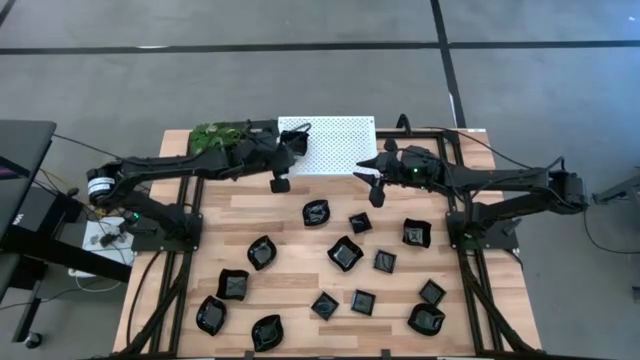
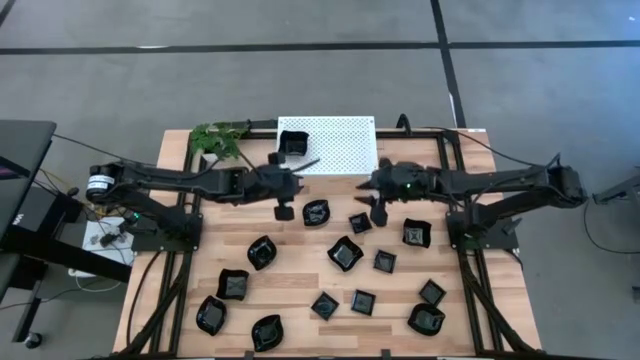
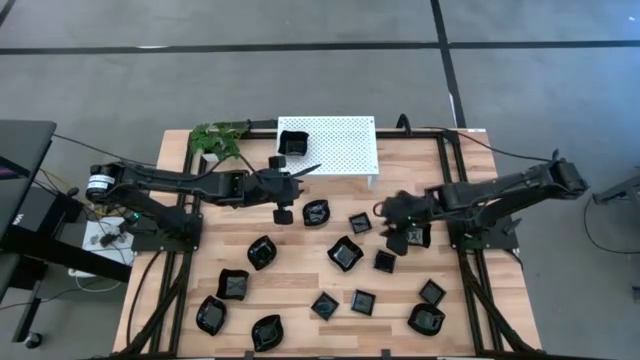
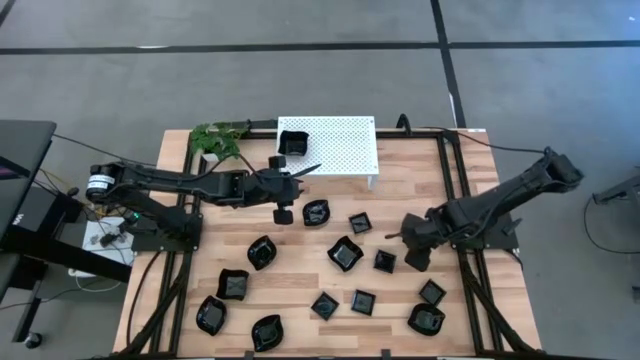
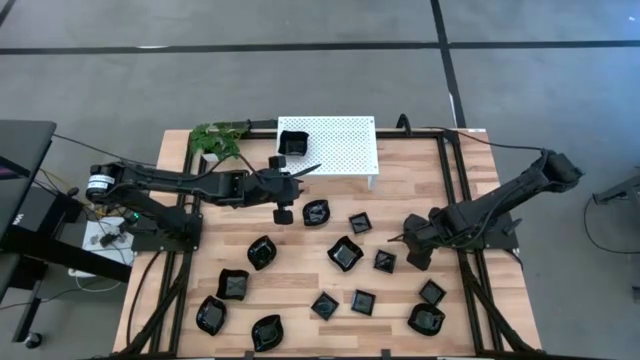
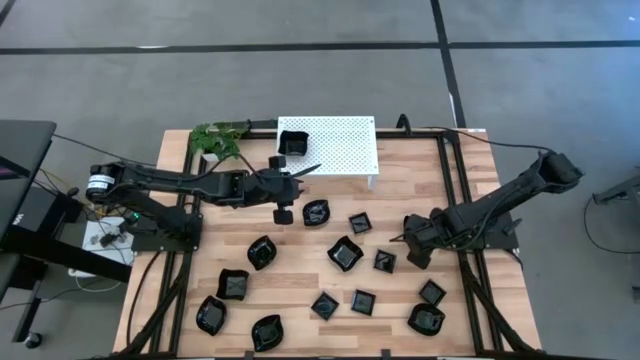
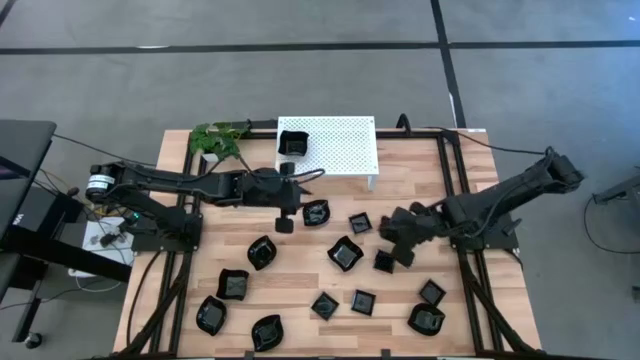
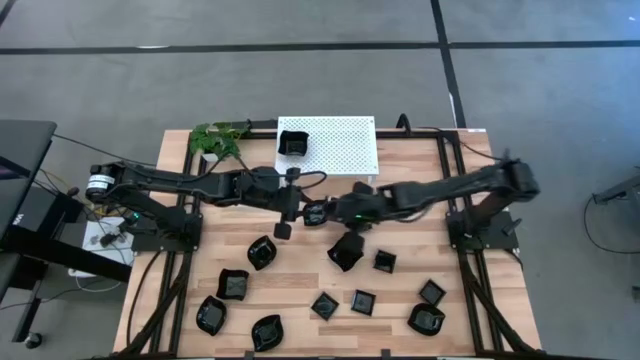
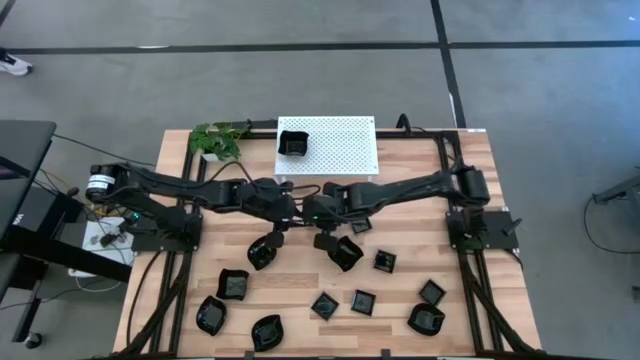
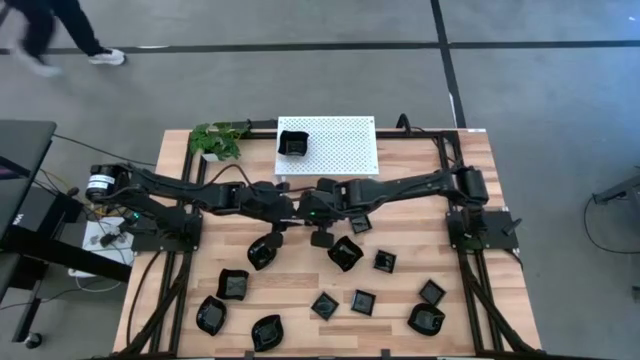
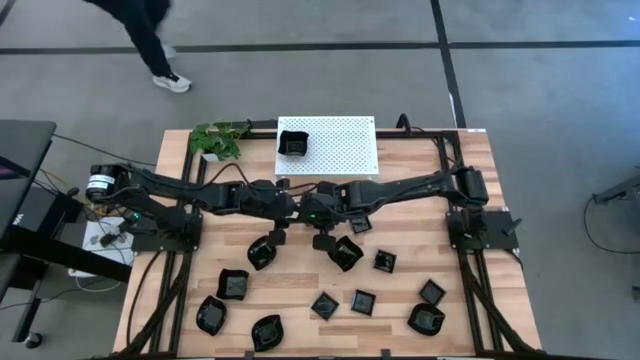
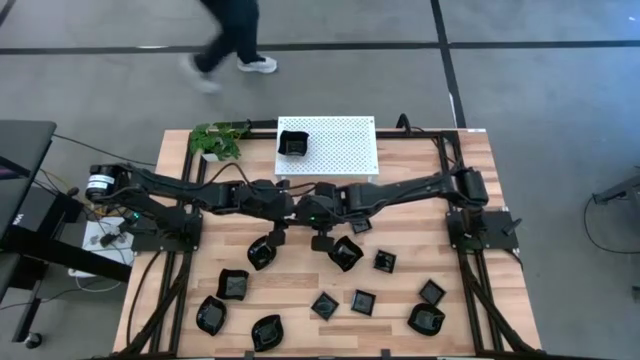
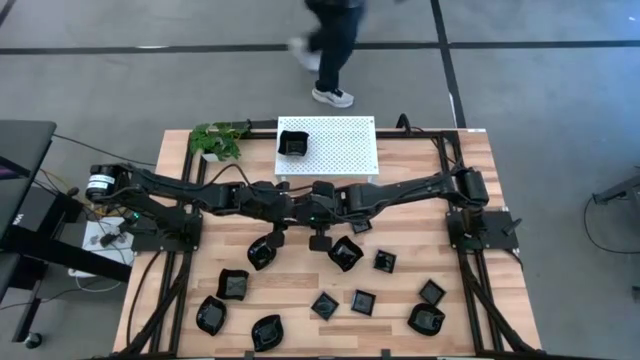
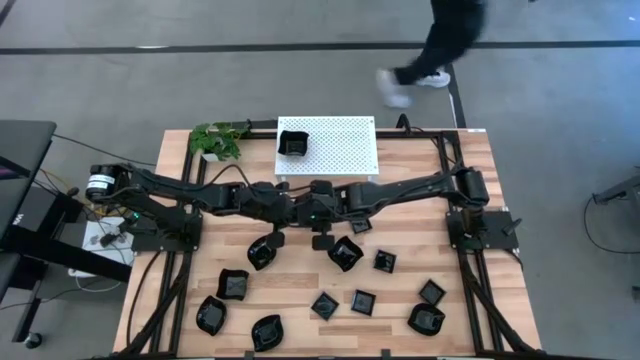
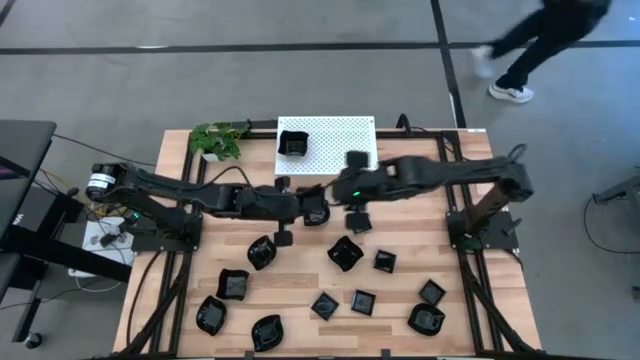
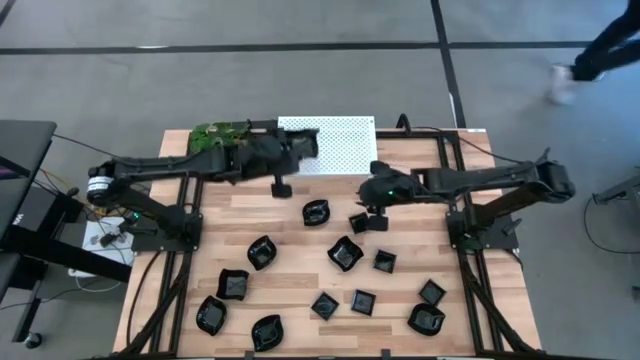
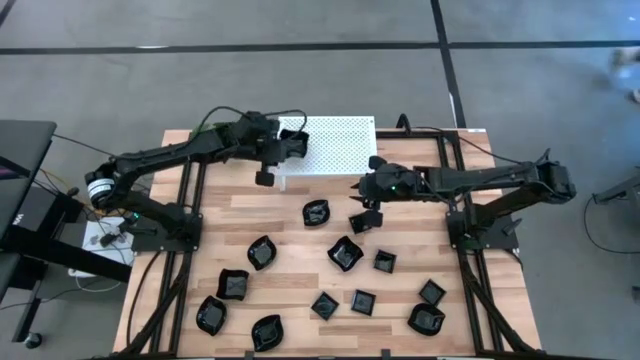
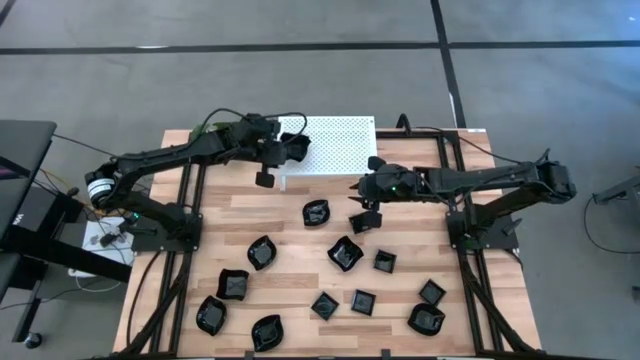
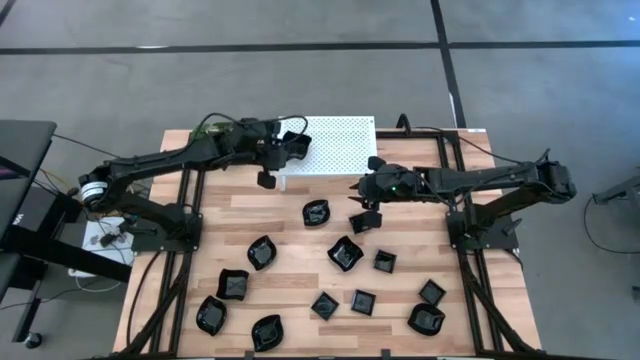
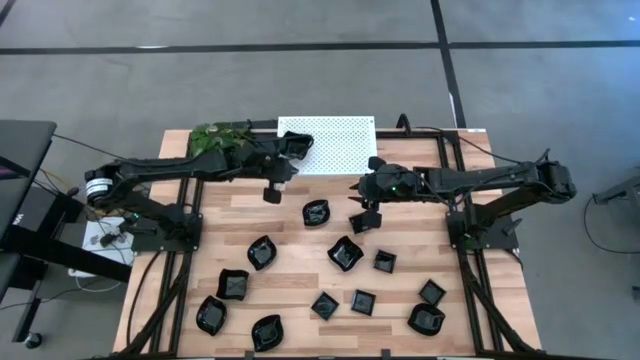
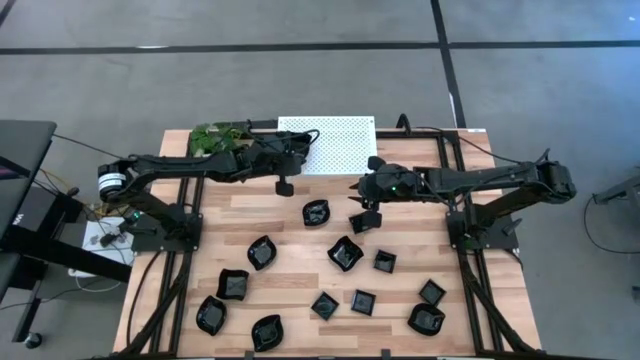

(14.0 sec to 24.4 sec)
Task: Pick & Place Mini shaped plates
Stack the black distorted square plate on top of the black distorted square plates on the shelf

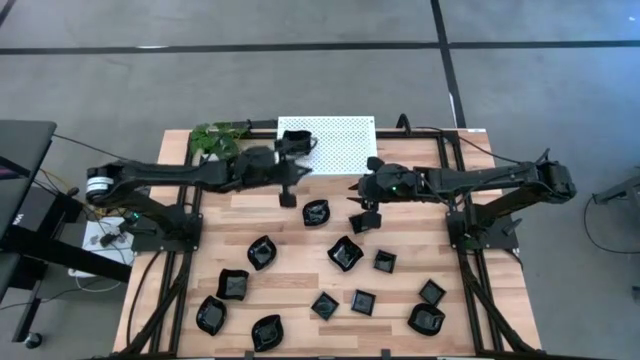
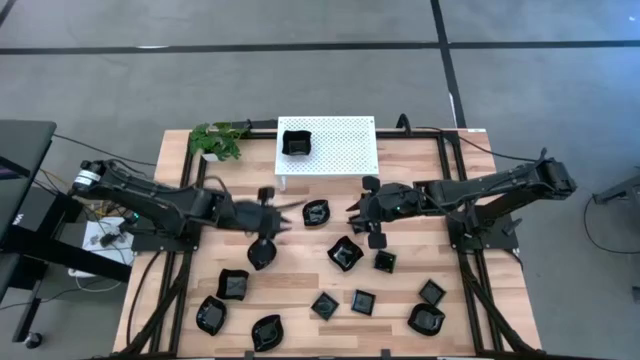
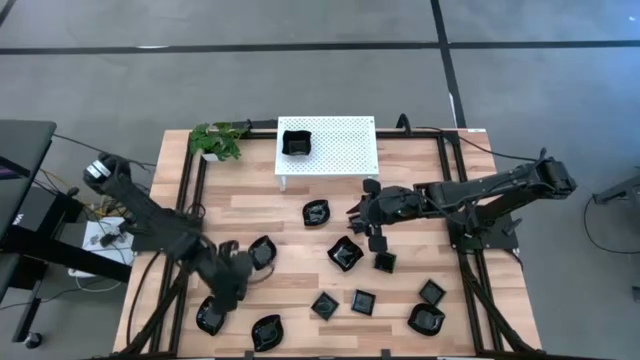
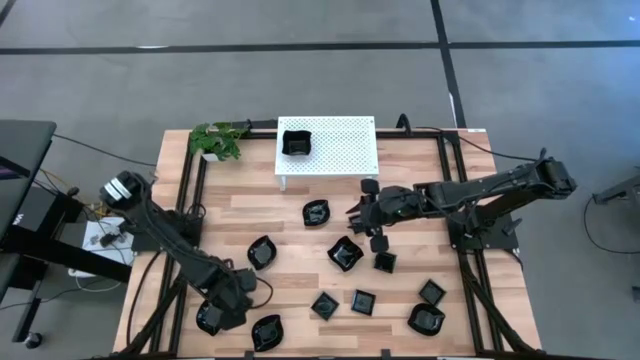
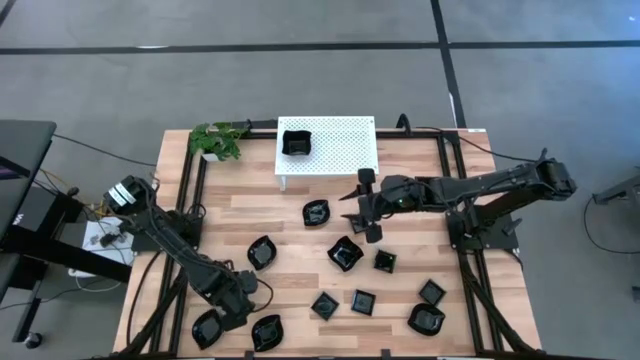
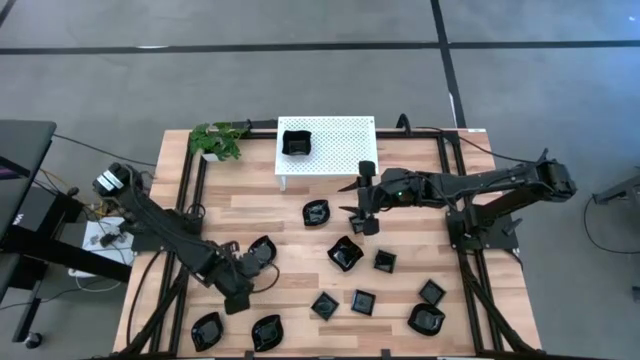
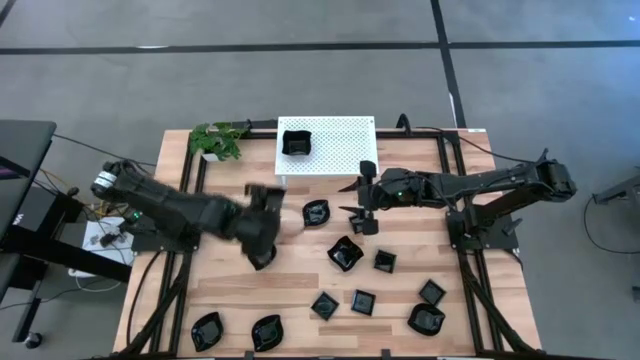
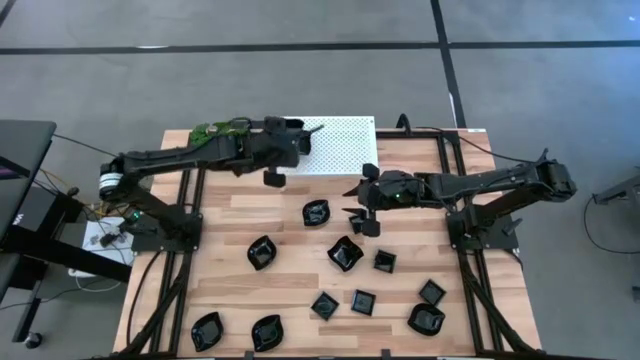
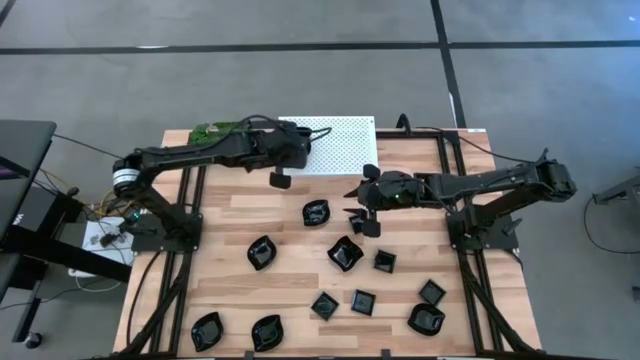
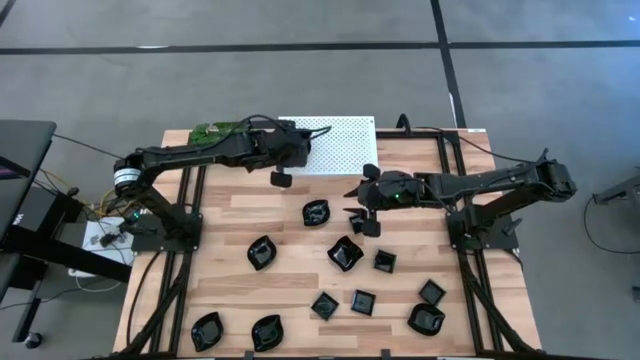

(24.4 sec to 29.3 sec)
Stack the black distorted square plate on top of the black distorted square plates on the shelf

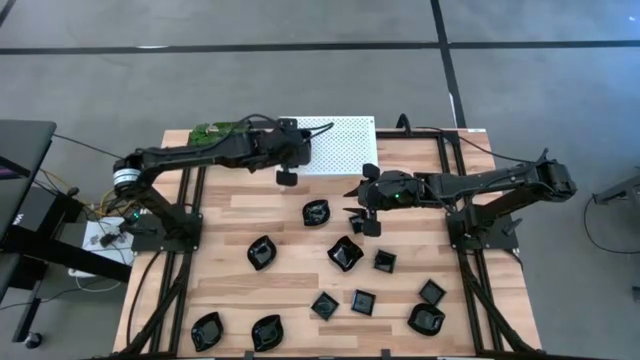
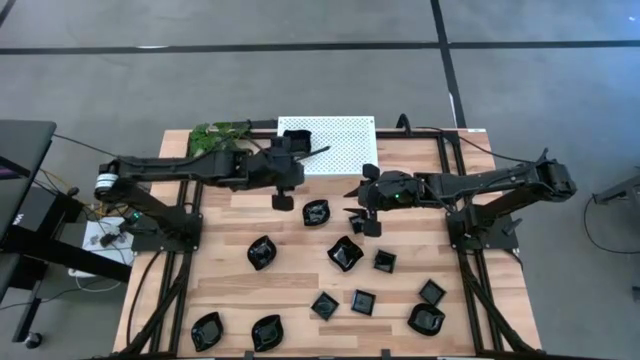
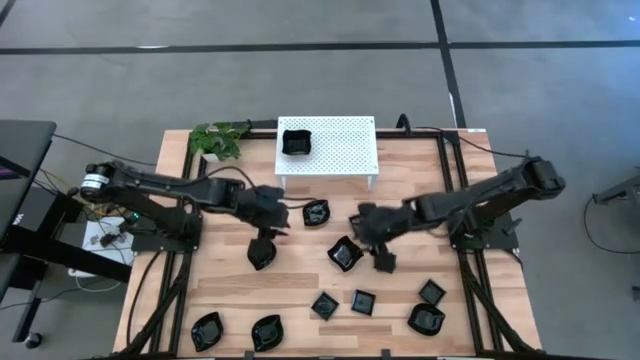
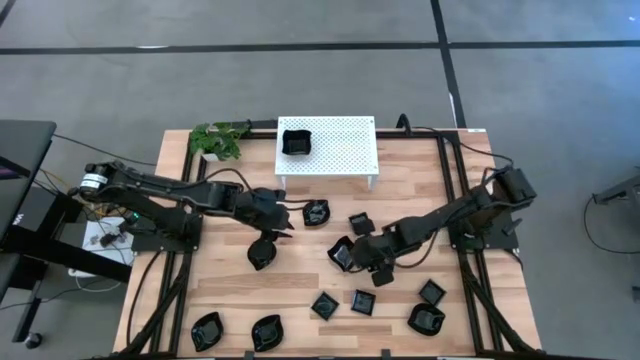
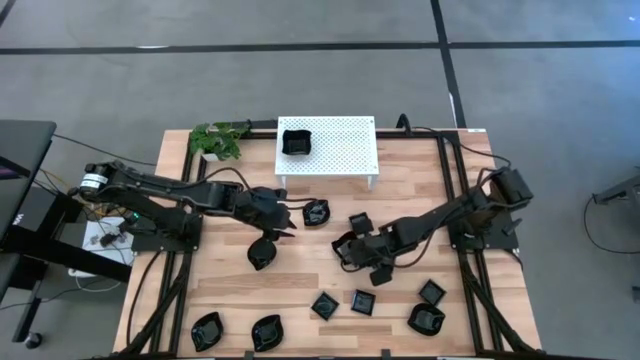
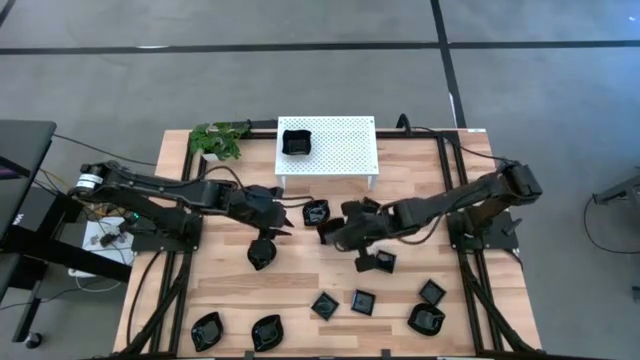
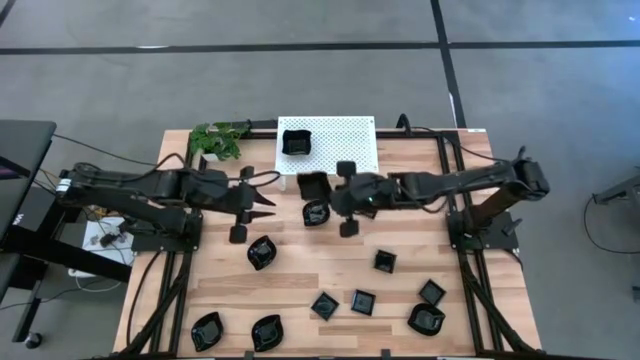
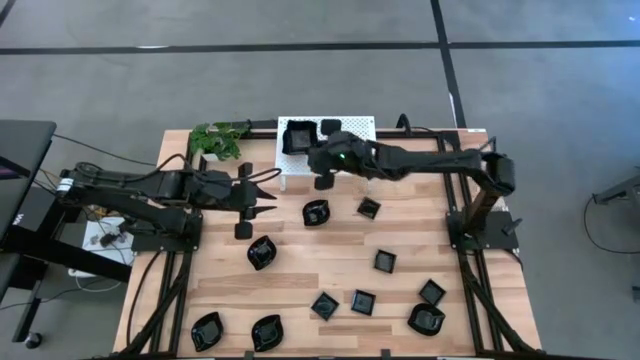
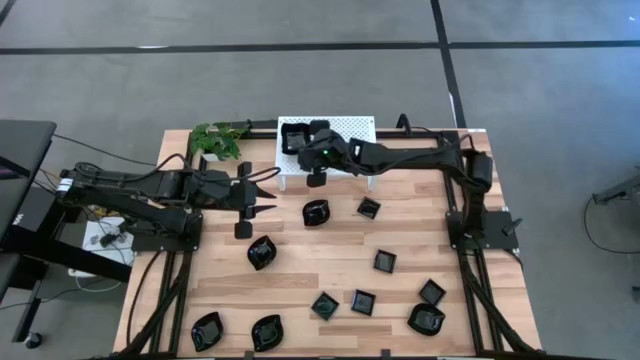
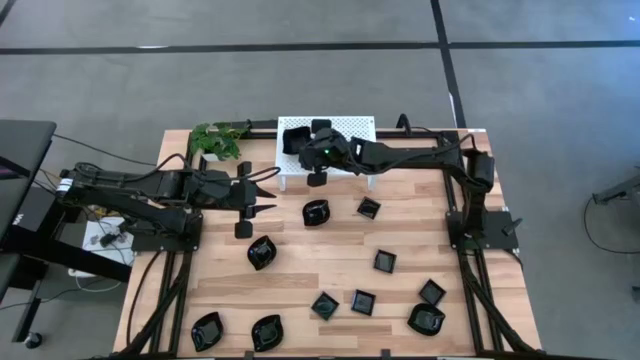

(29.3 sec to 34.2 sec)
Stack the black distorted square plate on top of the black distorted square plates on the shelf
